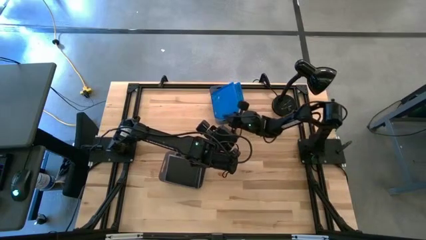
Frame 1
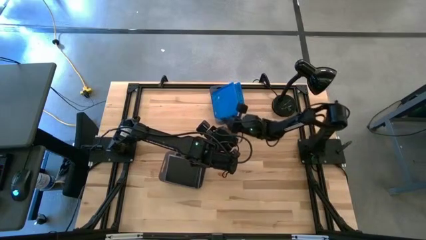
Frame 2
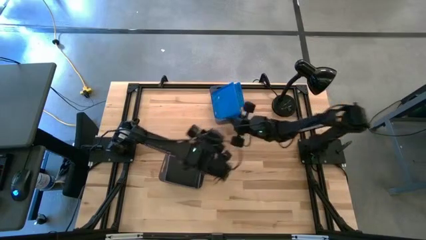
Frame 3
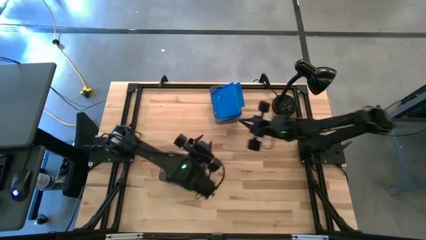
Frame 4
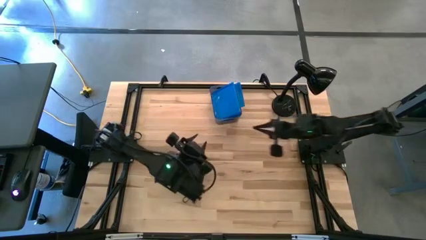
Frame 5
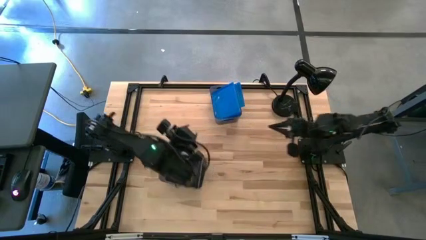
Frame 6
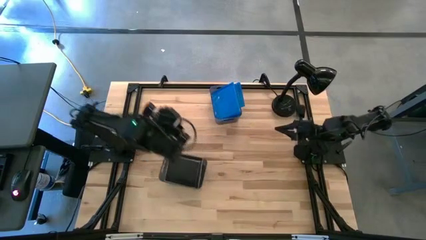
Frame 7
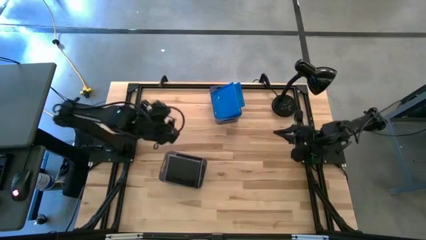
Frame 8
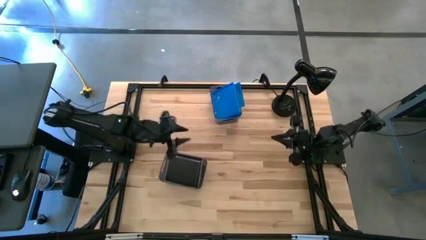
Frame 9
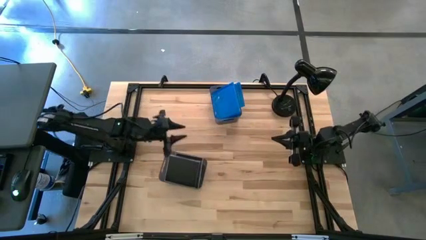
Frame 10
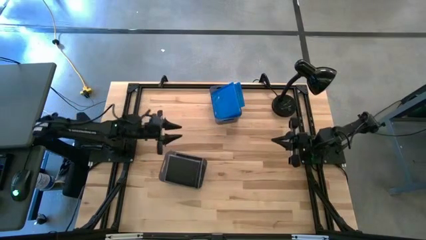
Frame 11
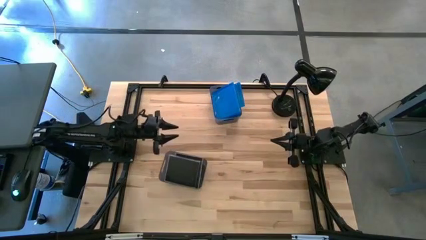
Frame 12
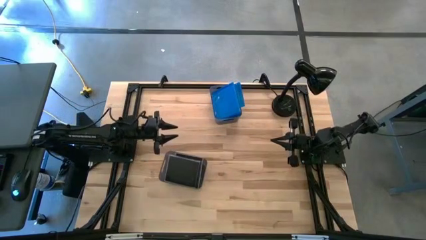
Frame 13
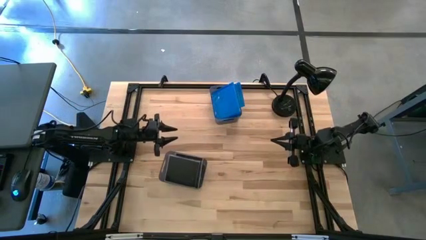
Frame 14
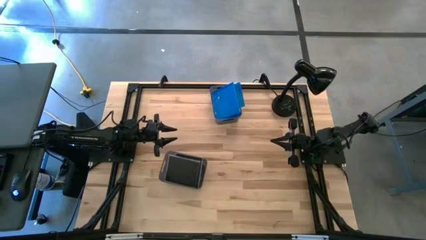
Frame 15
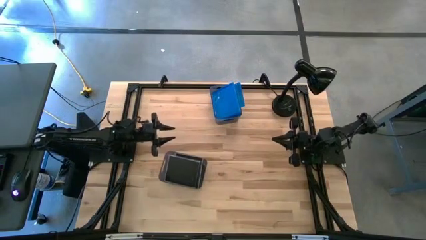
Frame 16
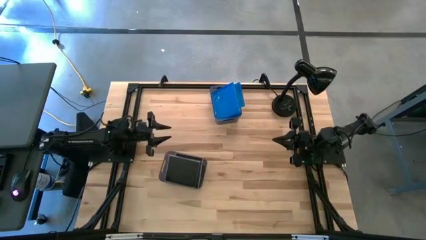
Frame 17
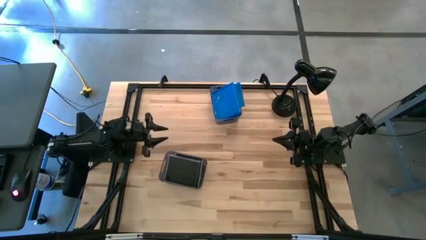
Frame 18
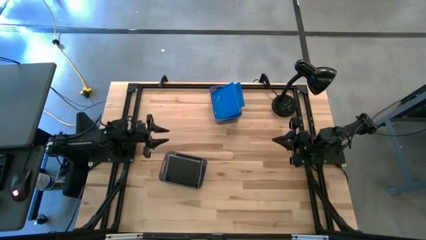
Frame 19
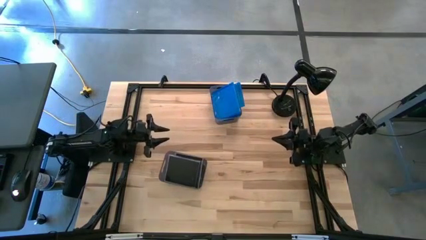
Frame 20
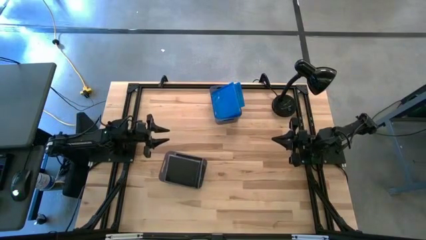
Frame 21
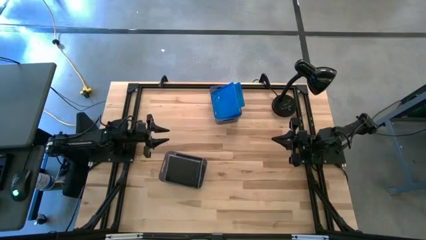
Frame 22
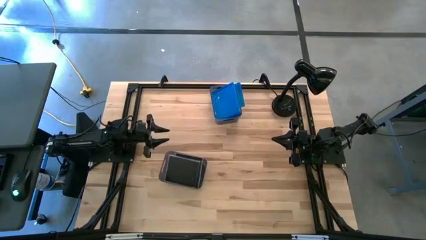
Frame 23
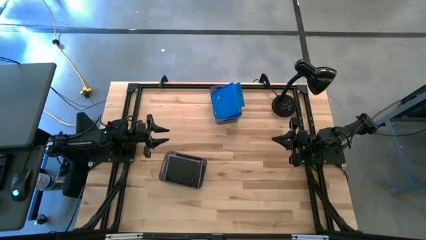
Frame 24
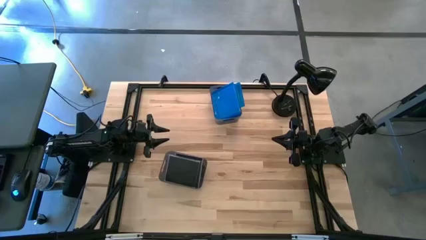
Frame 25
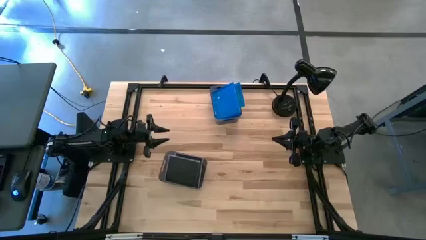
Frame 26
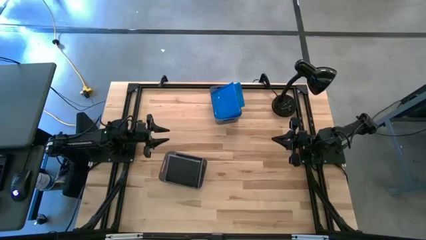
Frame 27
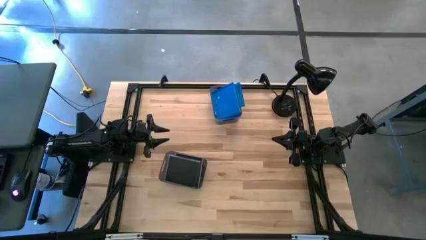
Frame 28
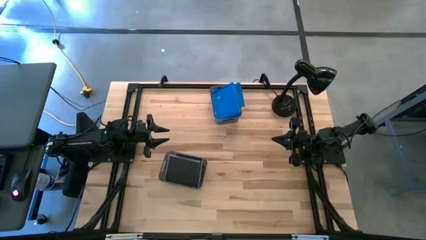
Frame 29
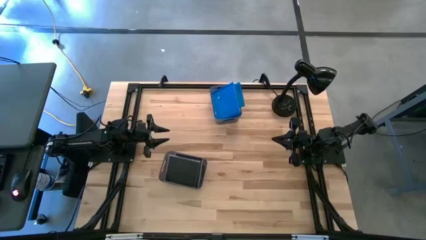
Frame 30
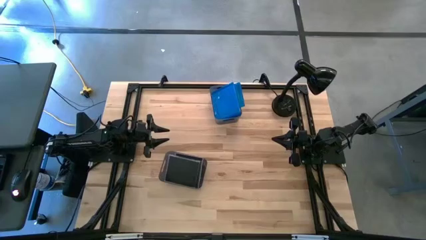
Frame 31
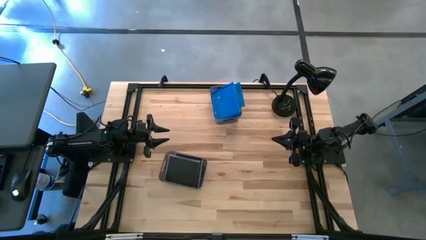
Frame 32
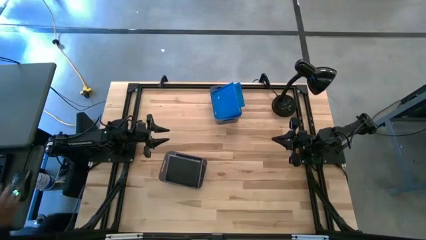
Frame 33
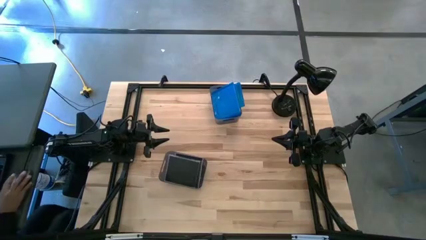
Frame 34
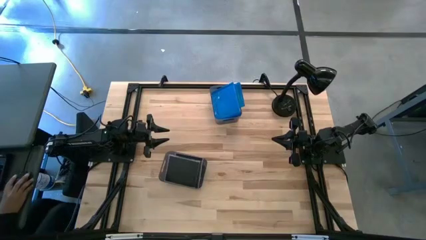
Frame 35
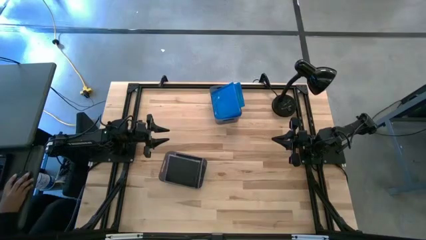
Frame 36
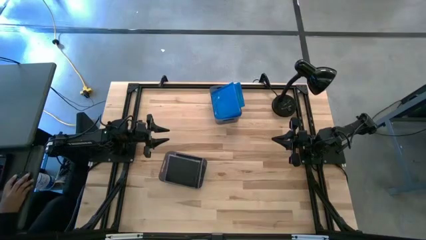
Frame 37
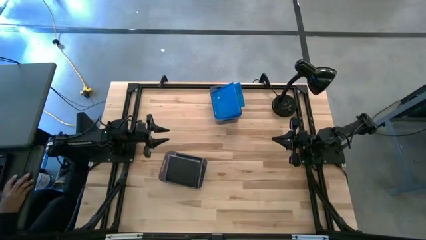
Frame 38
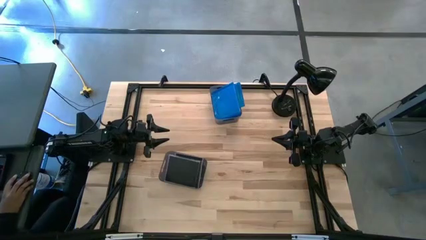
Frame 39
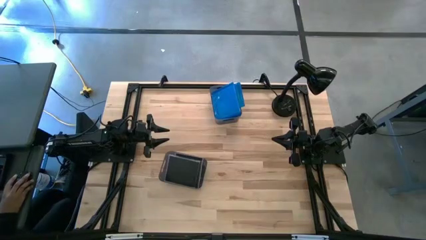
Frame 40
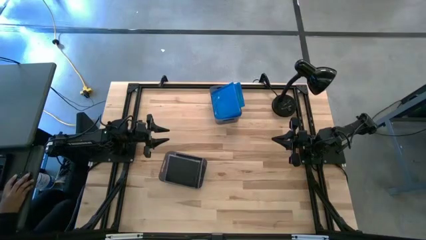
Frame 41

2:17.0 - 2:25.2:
Task: Pick & place jewel cases by type
Return to Home Position

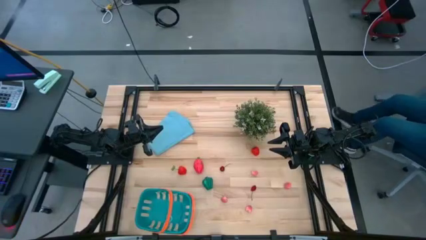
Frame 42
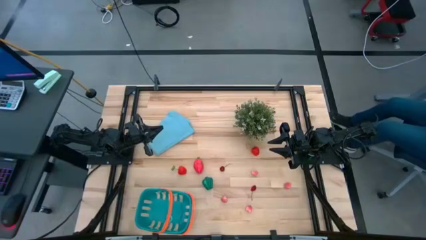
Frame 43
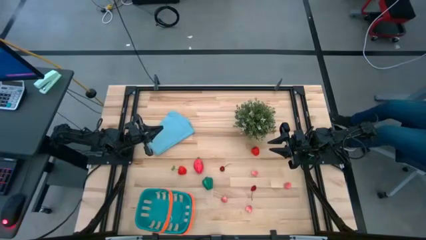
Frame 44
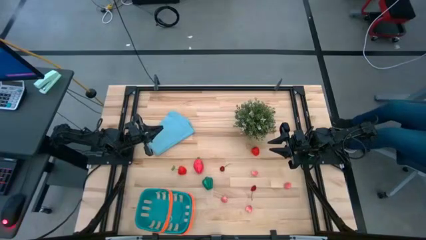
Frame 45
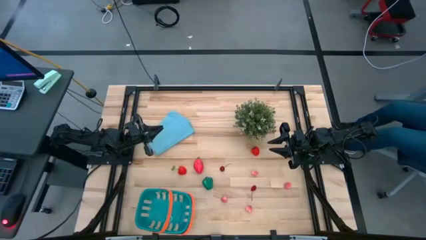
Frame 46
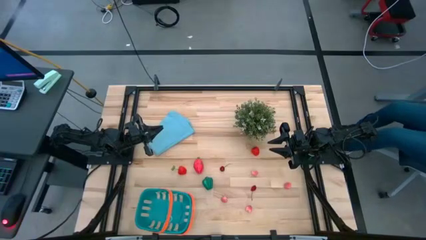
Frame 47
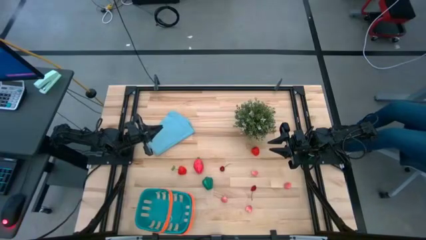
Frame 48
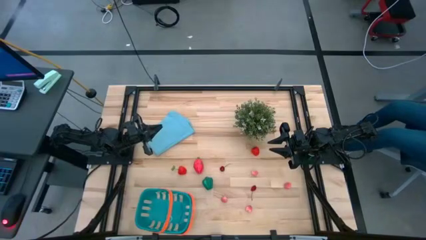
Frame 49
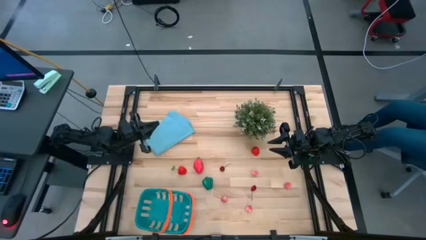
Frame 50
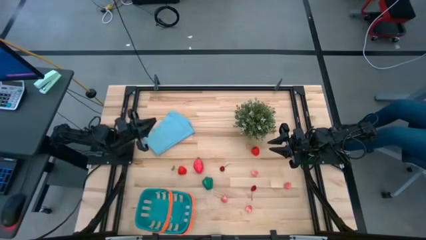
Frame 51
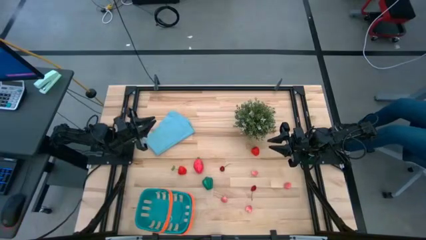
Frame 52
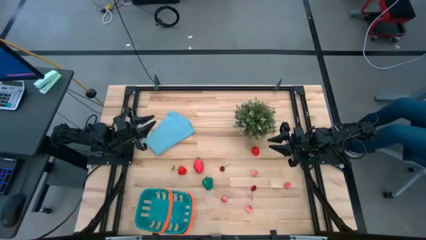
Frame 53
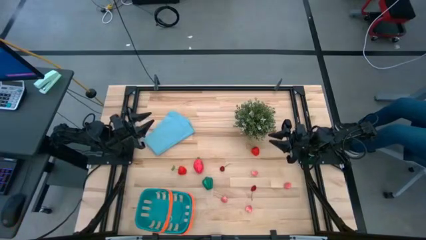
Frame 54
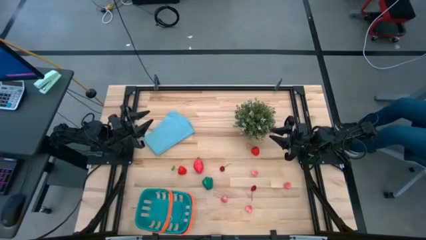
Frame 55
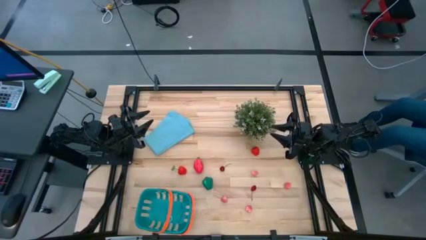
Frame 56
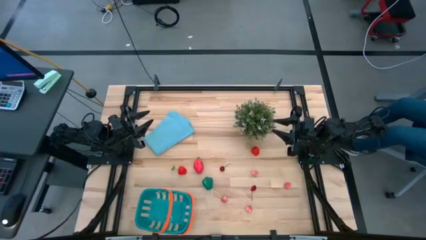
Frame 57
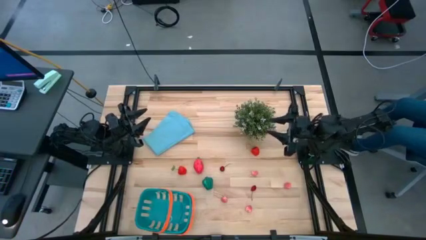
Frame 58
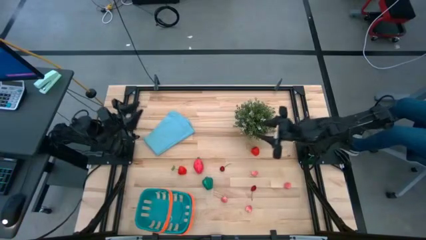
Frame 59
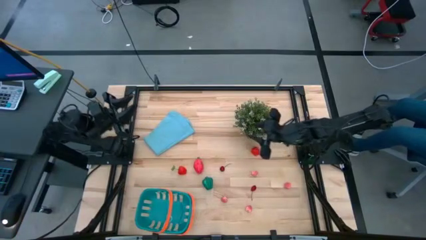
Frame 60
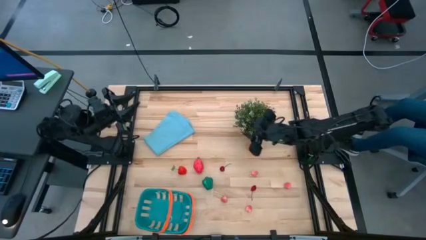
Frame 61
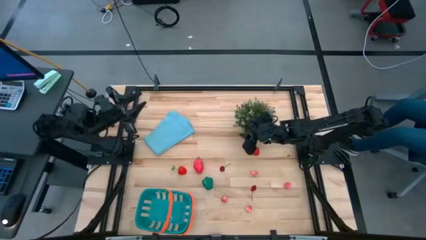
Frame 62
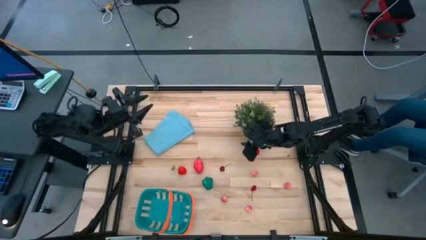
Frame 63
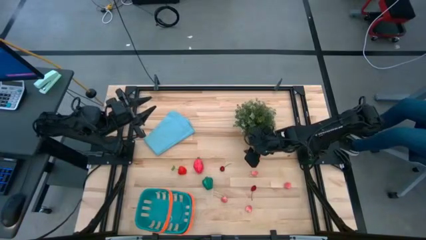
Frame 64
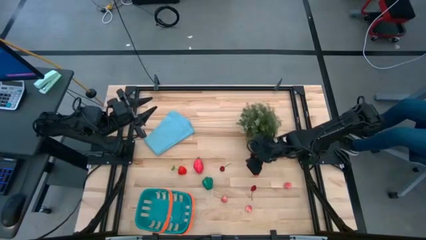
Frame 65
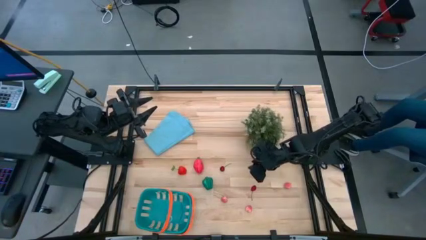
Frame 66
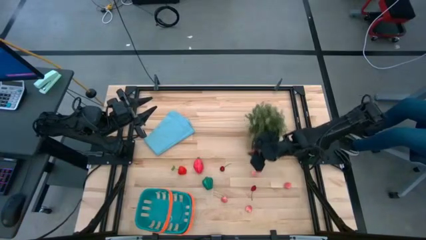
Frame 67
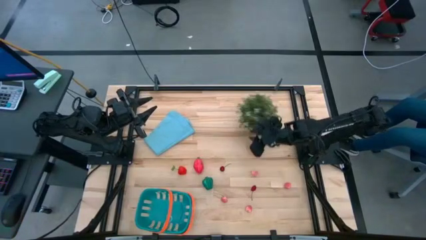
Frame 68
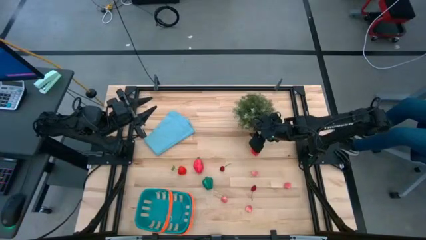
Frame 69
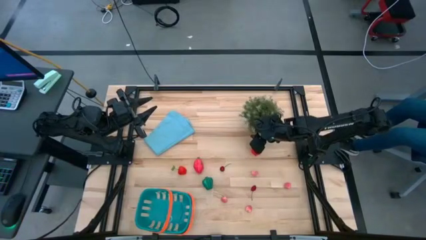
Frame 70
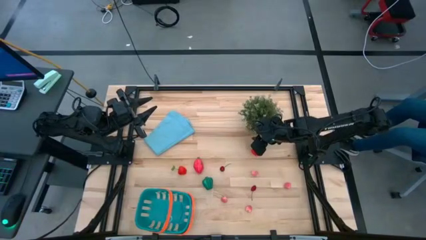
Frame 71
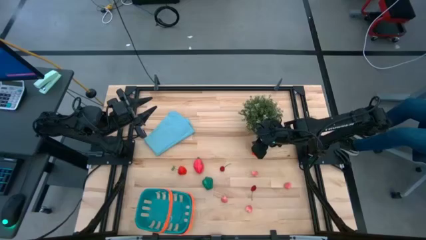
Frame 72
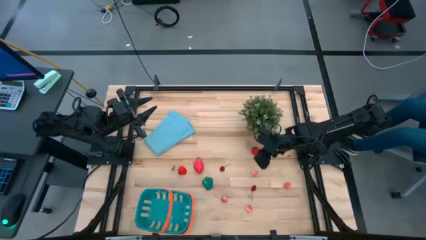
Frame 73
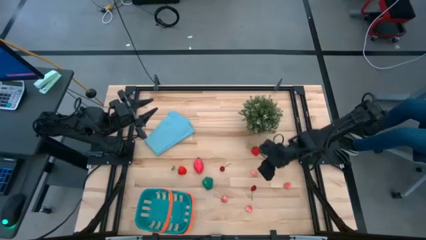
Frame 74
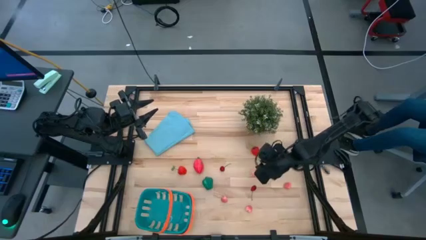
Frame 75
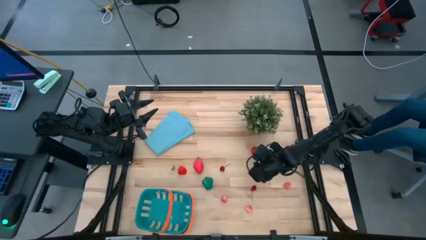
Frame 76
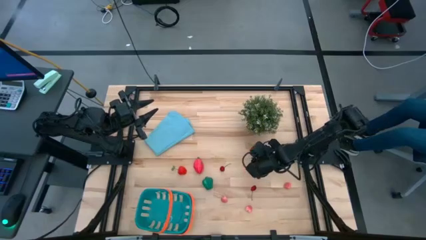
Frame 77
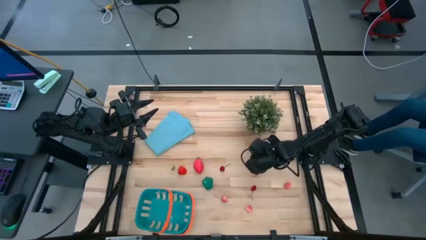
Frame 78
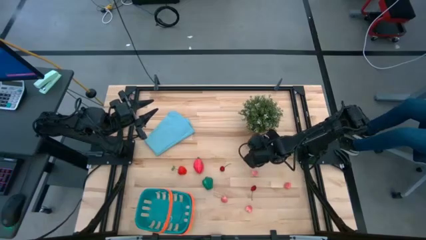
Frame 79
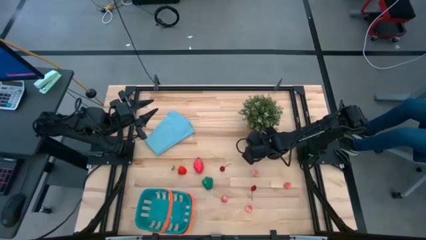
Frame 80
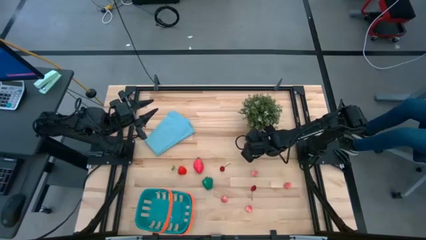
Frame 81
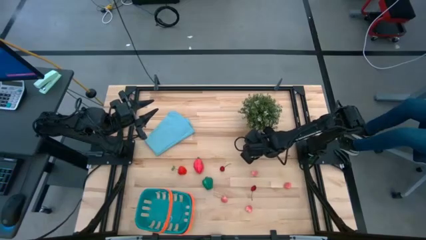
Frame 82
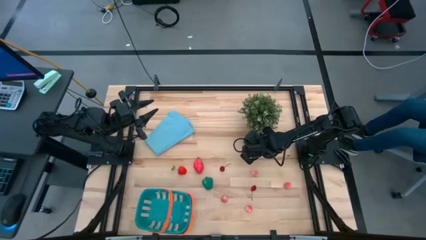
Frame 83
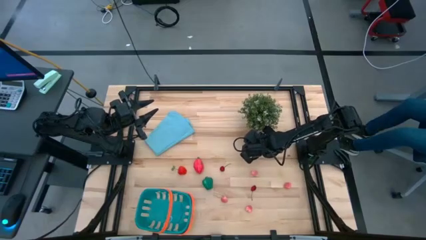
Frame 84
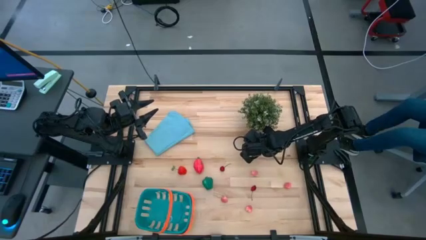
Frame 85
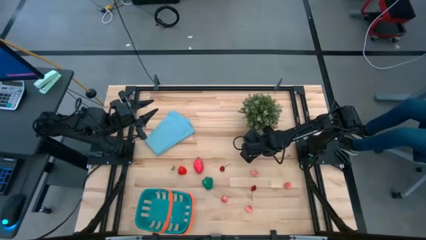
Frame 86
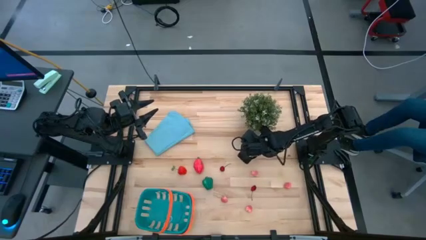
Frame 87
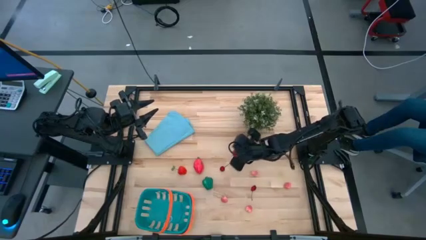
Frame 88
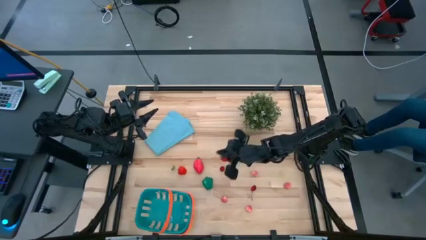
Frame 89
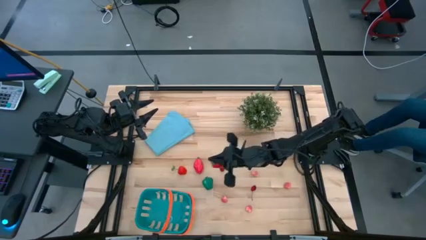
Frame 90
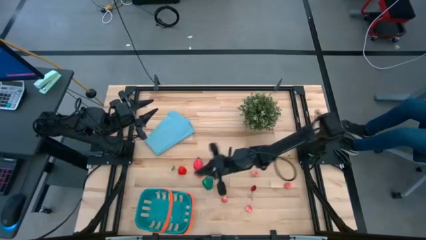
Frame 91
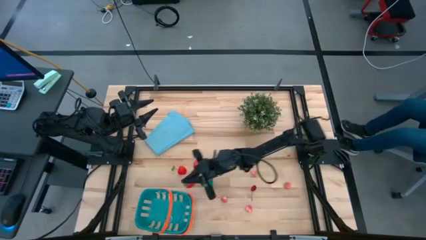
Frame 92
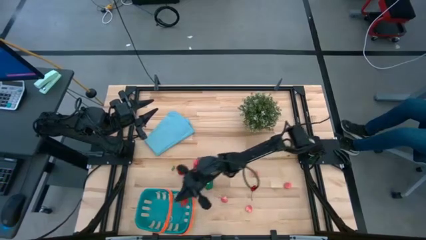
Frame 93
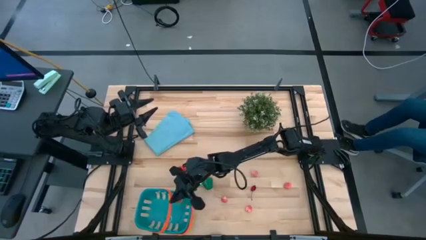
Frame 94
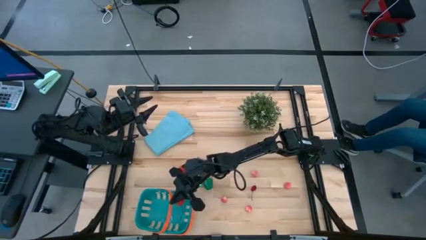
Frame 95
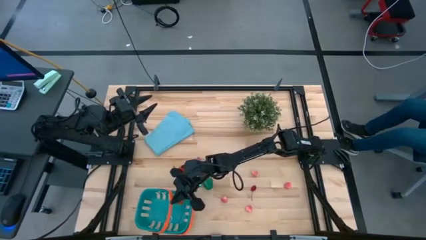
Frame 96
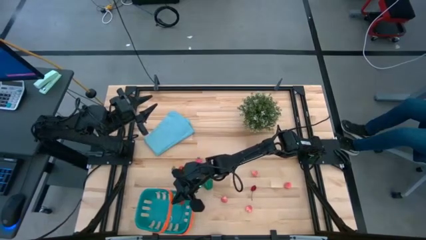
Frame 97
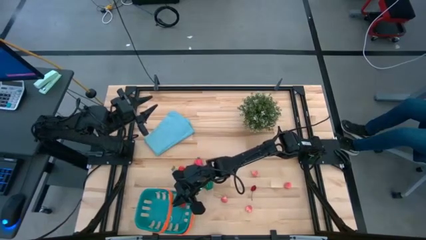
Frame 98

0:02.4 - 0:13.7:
Task: Pick and placing Produce into tupperware
Put the red strawberry into the blue basket
